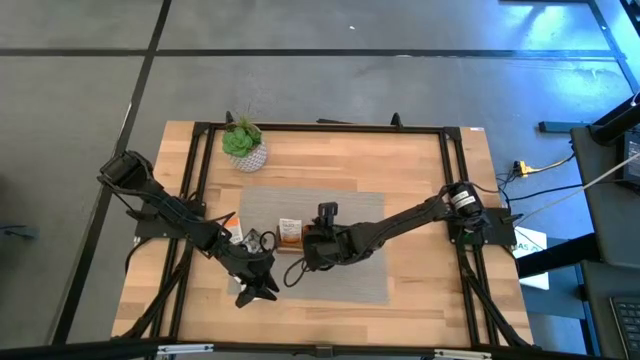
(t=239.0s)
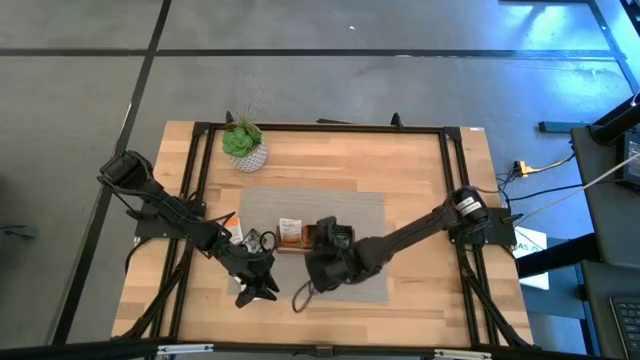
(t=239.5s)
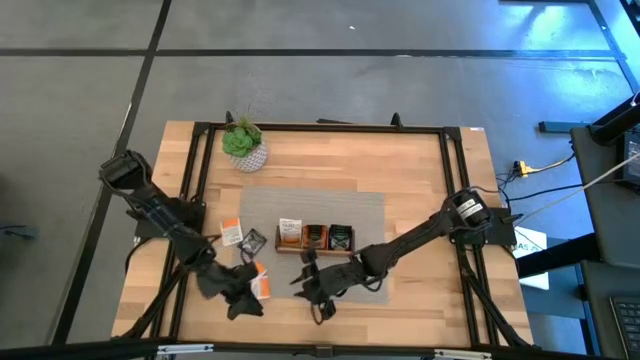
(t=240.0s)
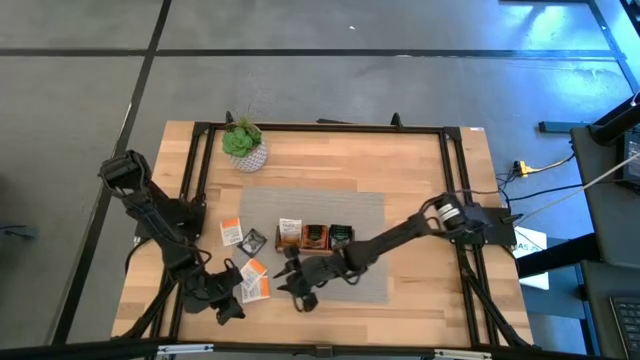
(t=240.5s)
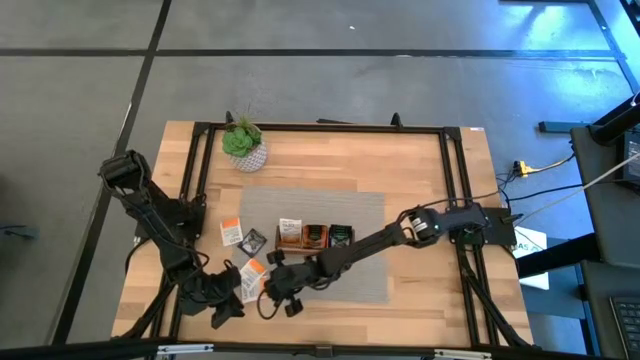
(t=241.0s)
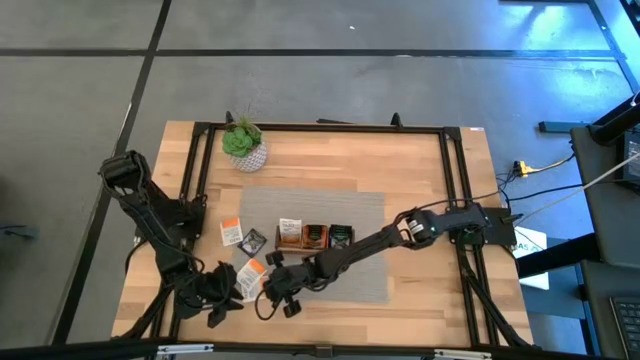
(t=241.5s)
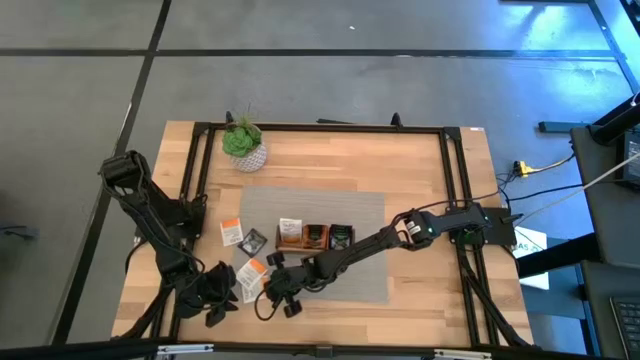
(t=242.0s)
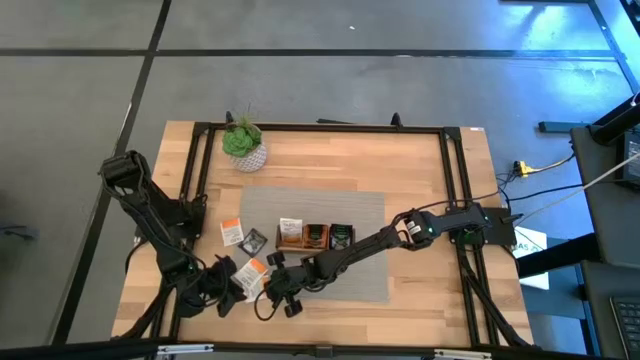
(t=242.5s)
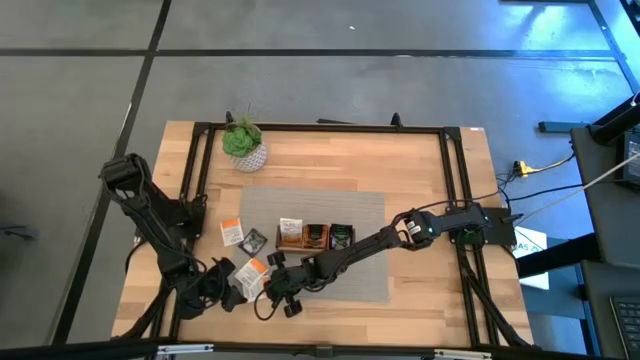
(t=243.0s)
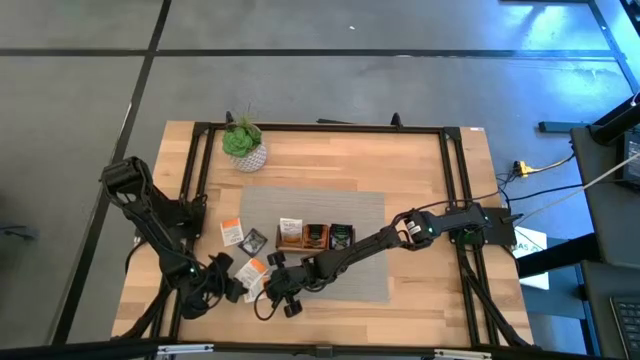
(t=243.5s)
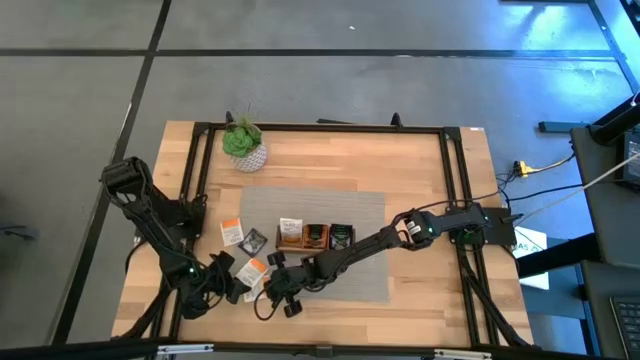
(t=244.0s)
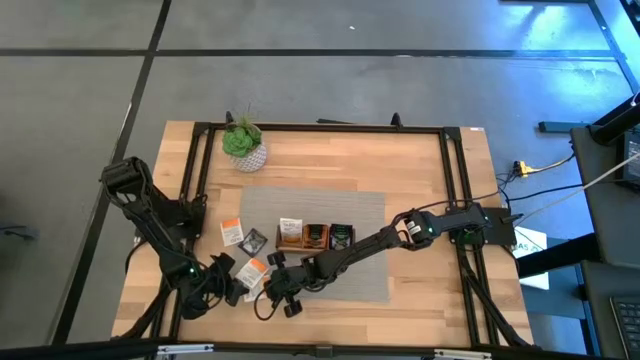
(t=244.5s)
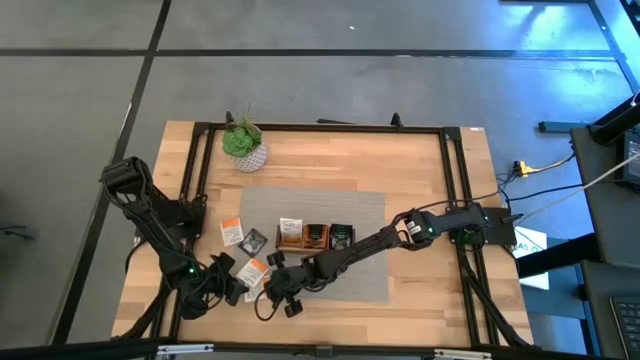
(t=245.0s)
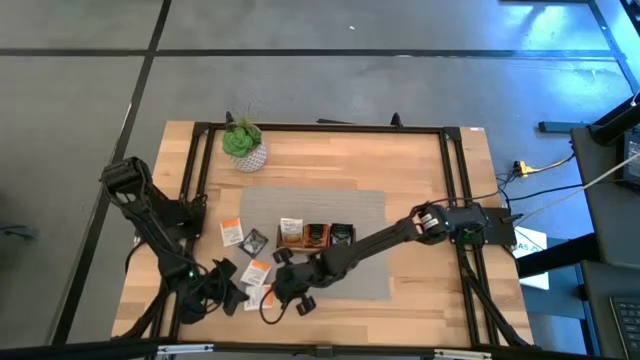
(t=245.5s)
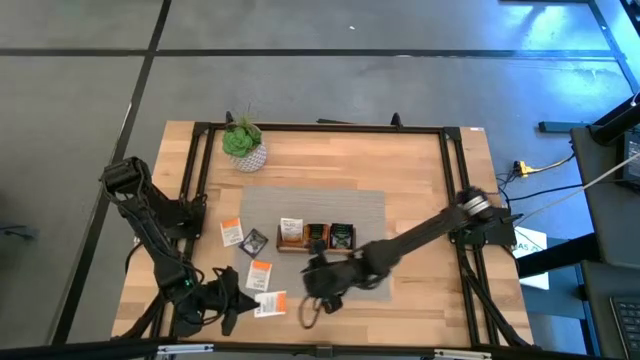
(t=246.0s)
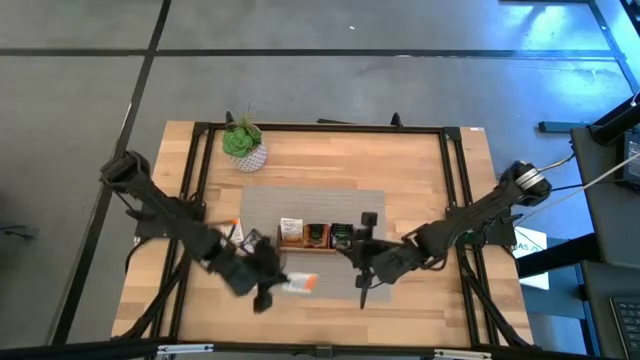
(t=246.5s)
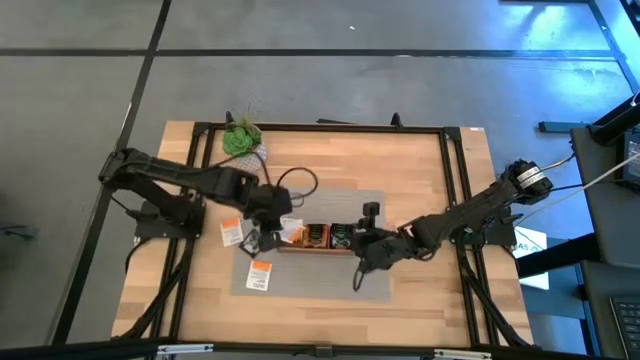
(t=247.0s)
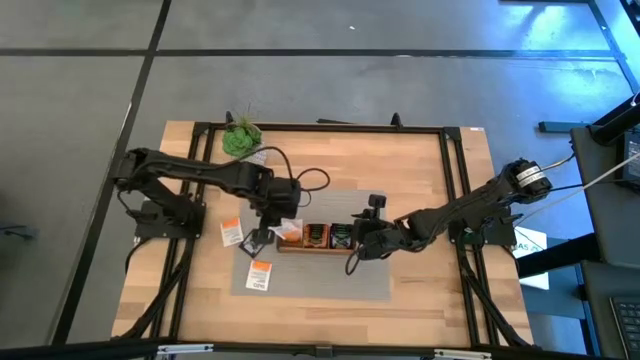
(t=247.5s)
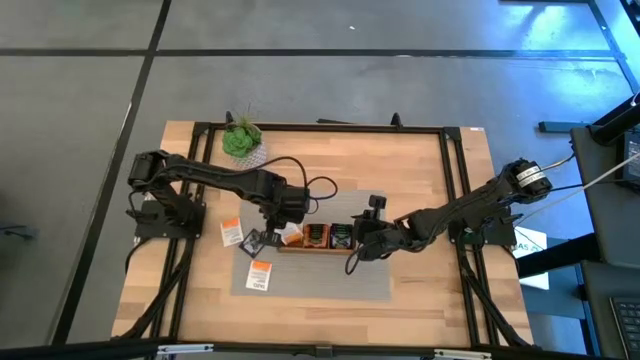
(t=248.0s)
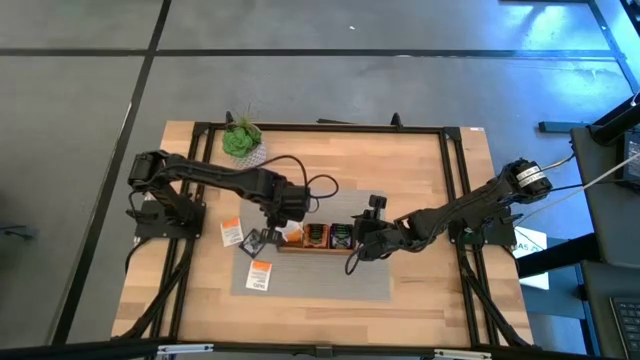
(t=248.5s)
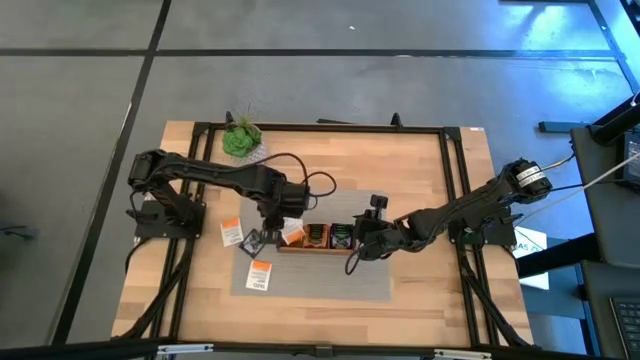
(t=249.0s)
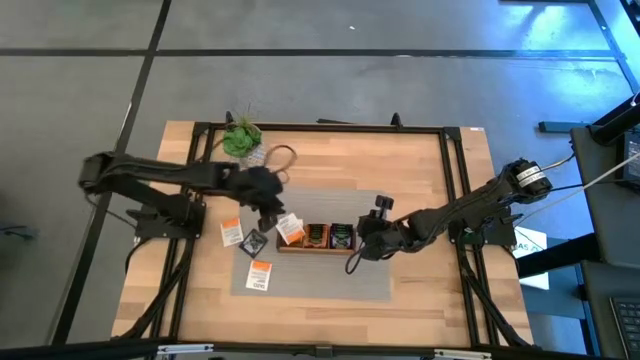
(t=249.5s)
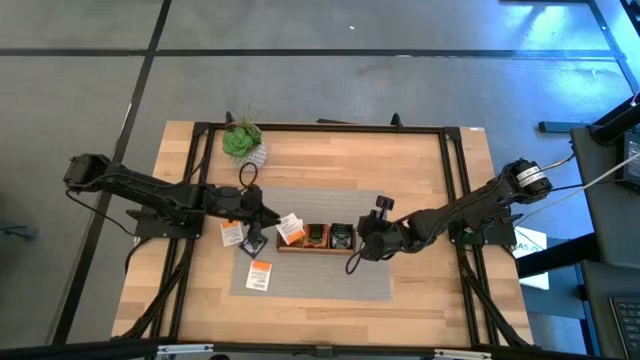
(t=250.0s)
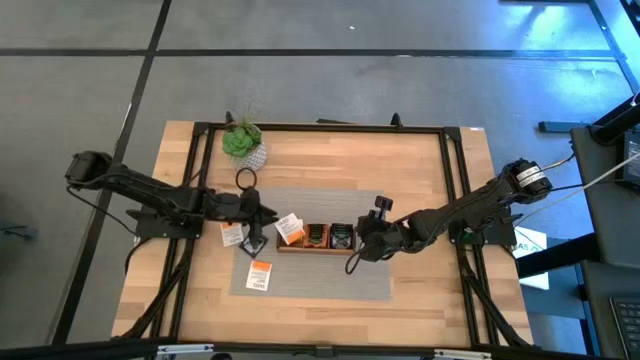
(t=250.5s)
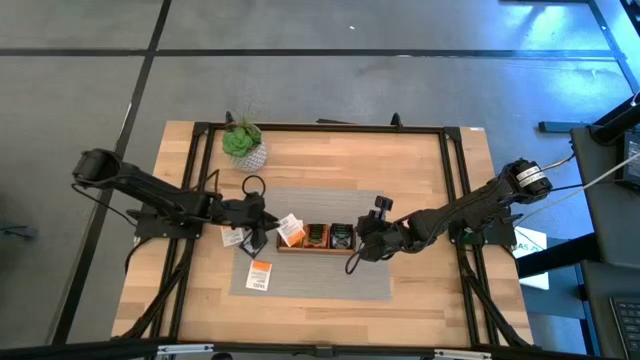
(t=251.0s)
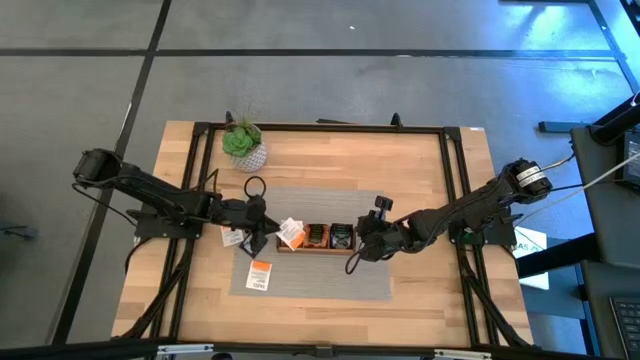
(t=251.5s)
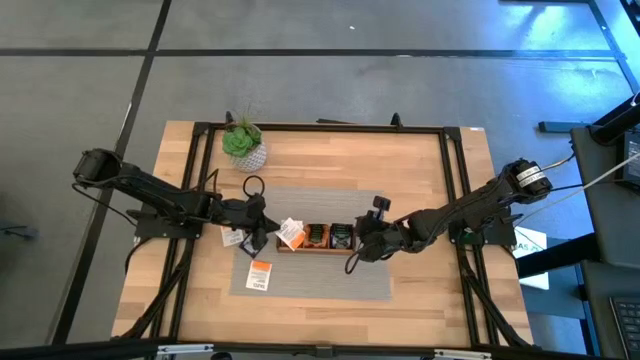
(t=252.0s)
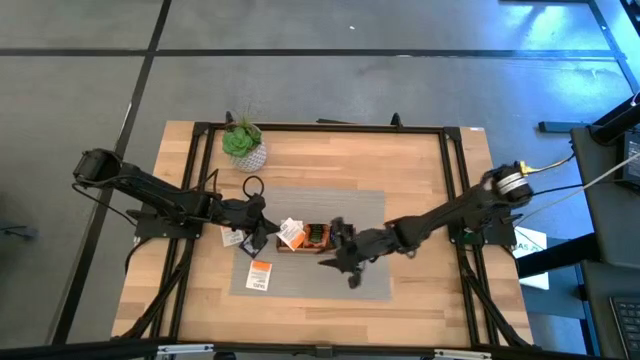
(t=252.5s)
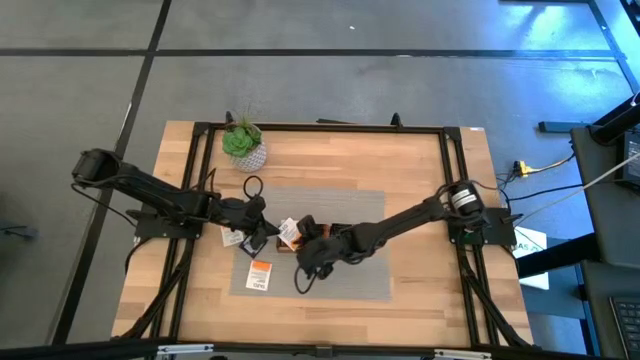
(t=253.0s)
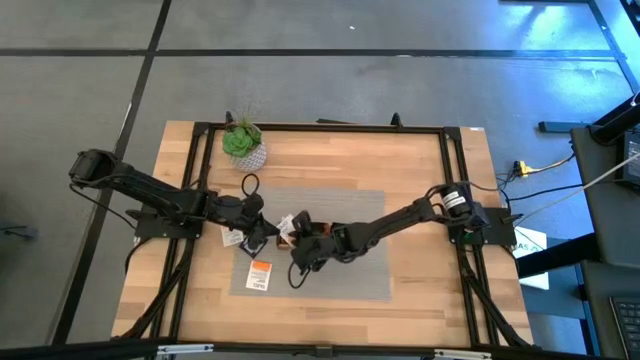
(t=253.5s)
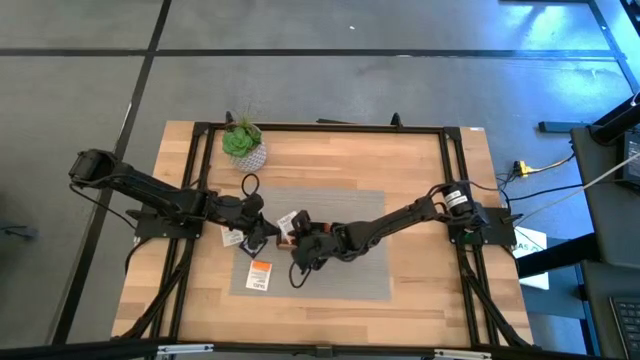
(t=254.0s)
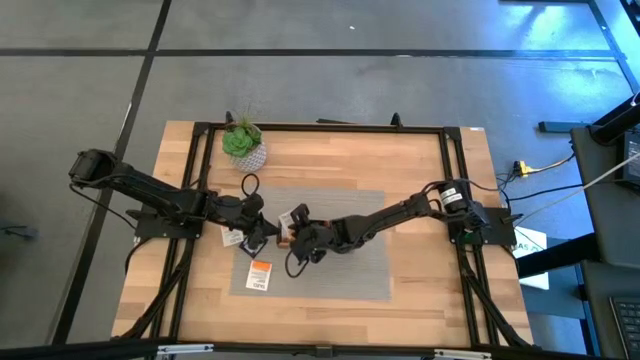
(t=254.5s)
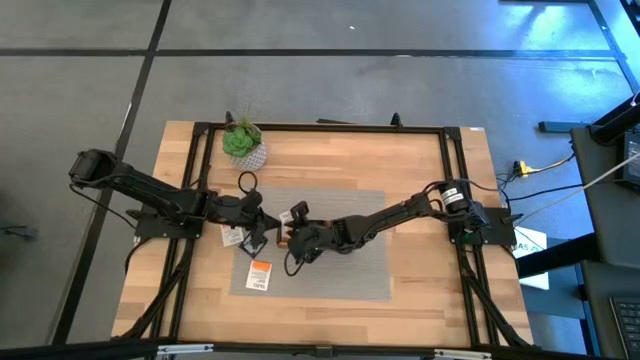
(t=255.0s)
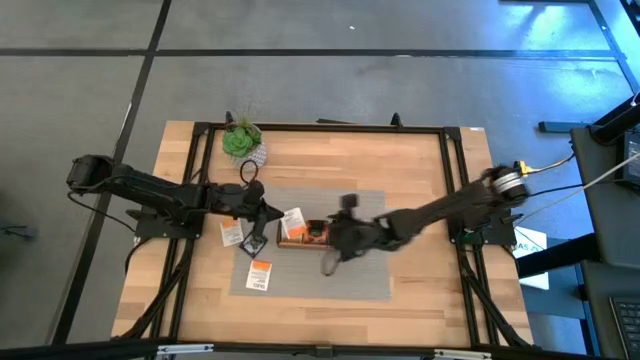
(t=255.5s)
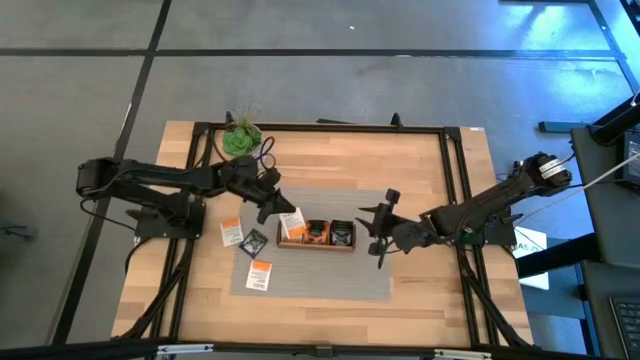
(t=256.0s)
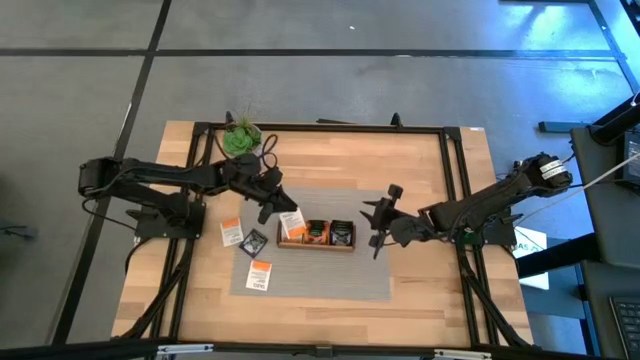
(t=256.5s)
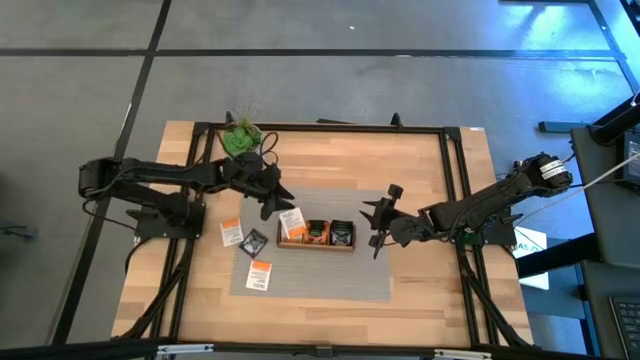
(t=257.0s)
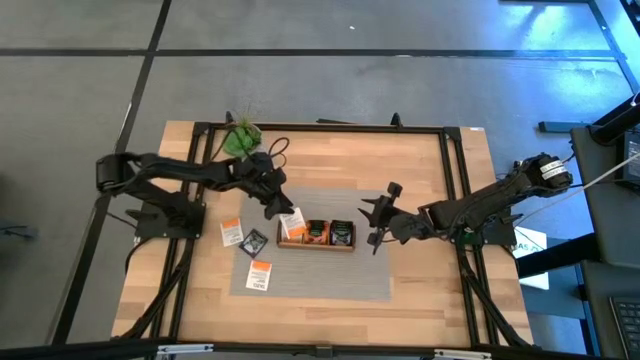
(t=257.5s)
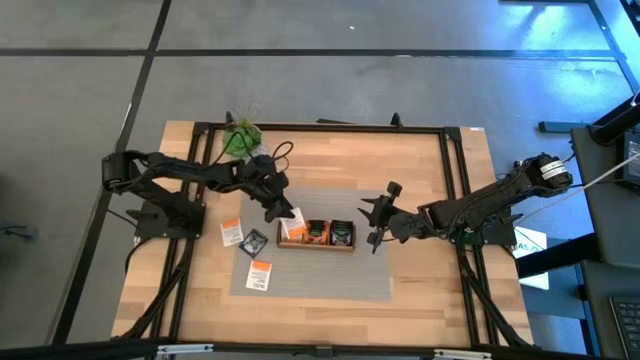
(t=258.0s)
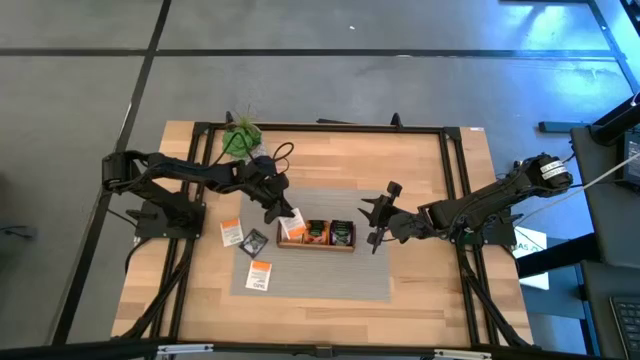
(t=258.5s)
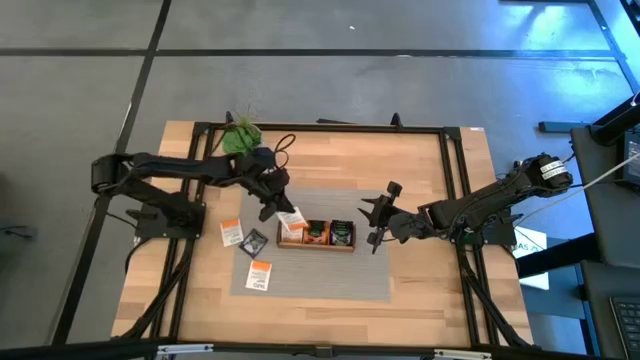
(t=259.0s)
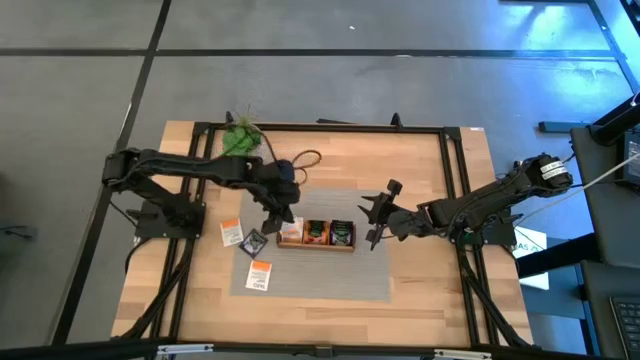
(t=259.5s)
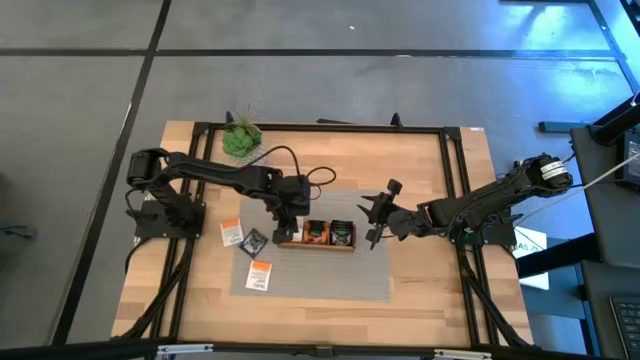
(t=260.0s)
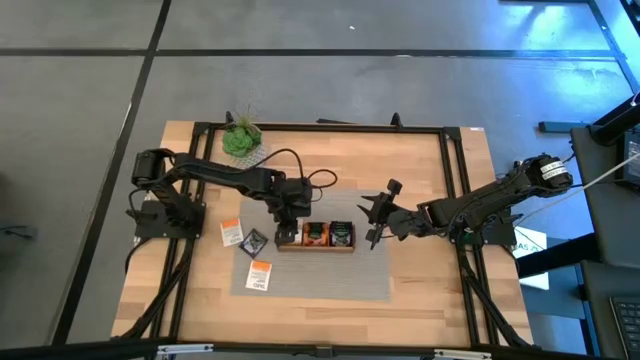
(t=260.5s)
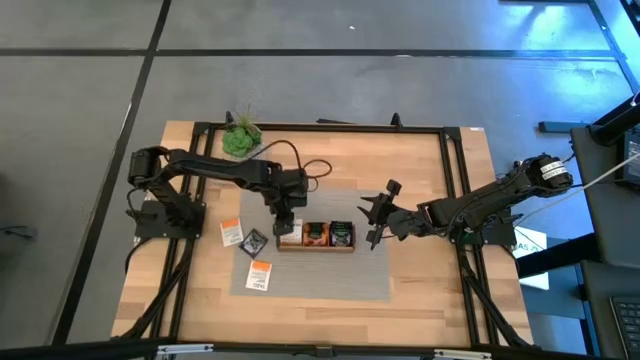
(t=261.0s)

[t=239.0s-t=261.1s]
Task: Pick & Place Tea
Put the white tea bag into the left section of the wooden organizer
